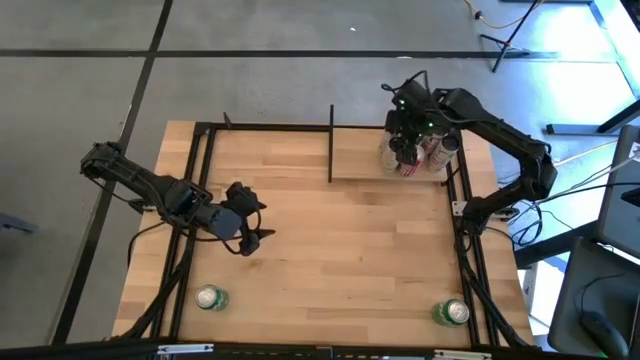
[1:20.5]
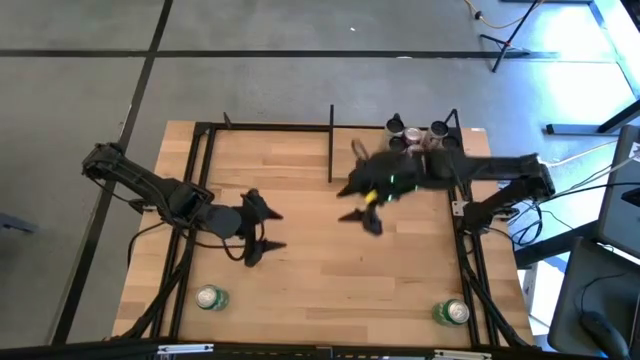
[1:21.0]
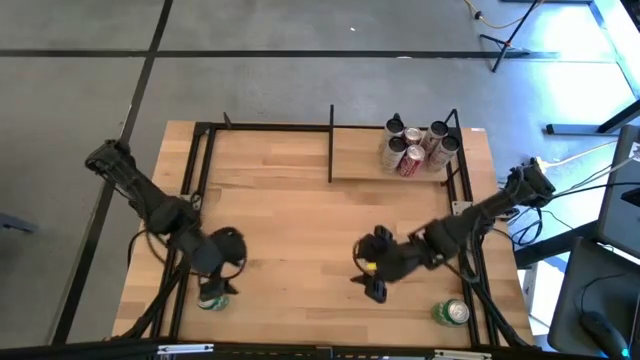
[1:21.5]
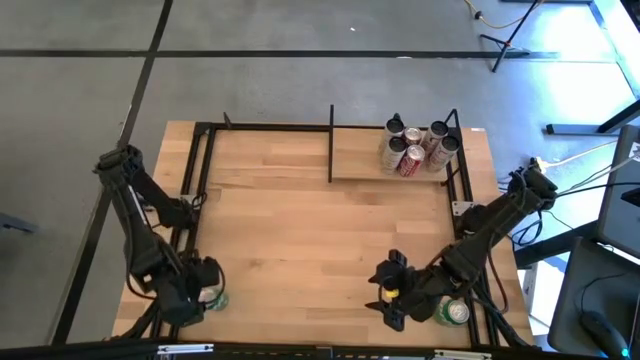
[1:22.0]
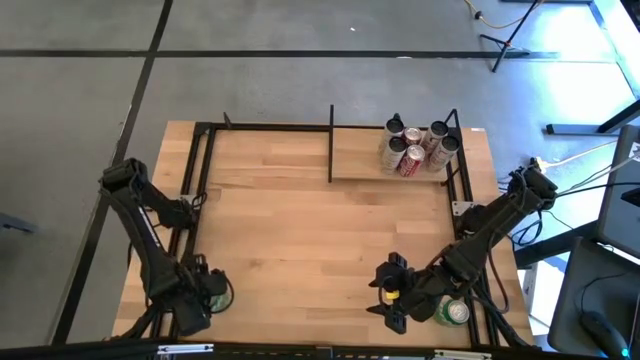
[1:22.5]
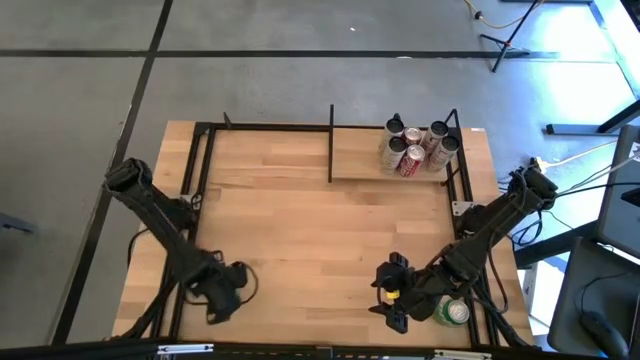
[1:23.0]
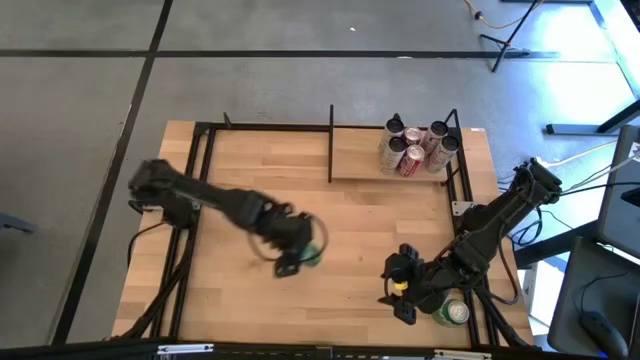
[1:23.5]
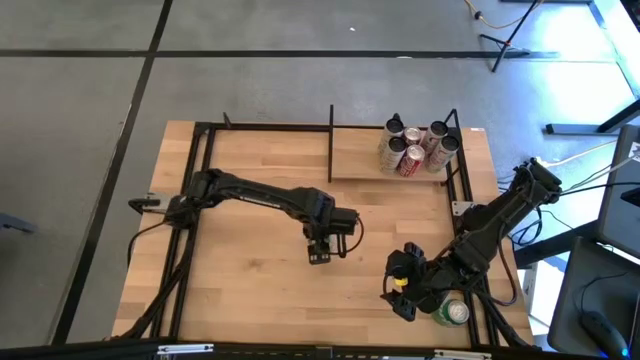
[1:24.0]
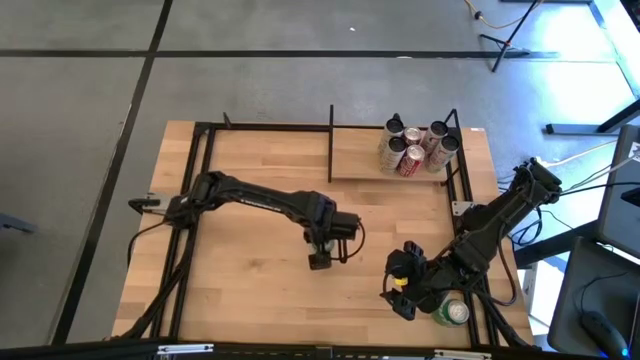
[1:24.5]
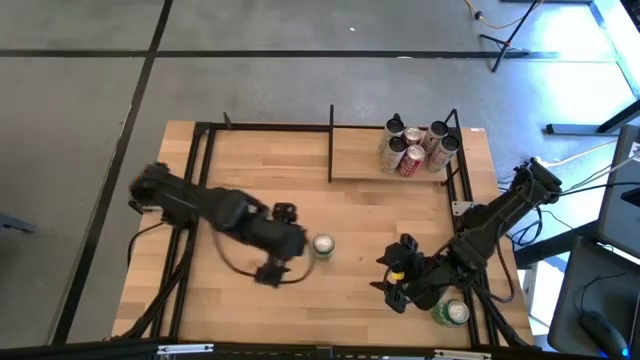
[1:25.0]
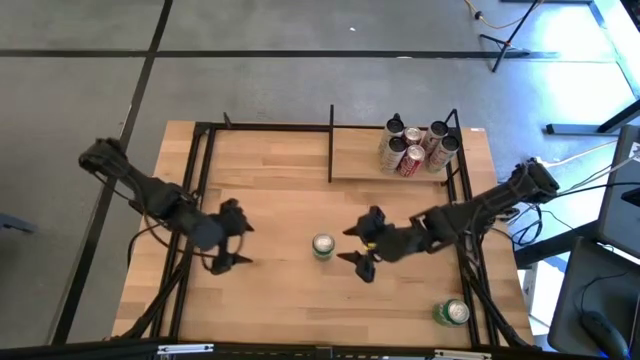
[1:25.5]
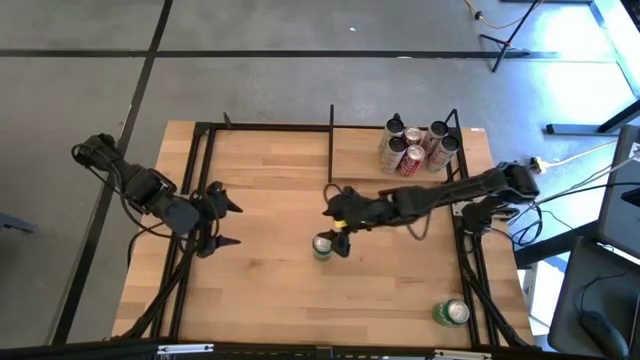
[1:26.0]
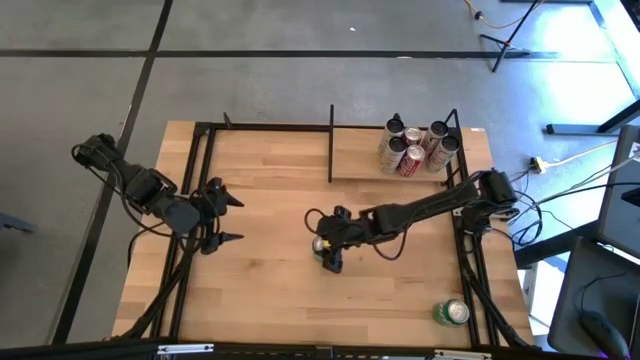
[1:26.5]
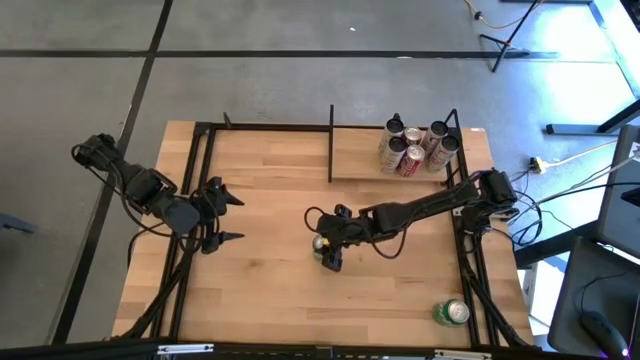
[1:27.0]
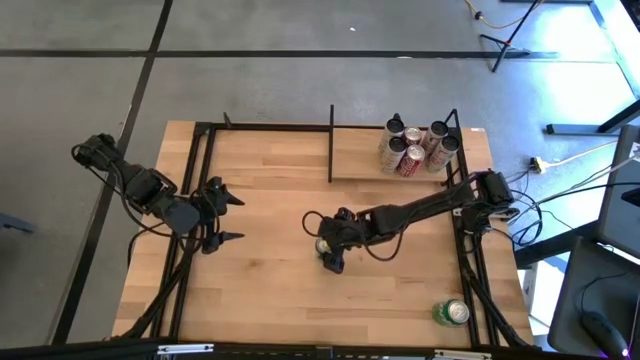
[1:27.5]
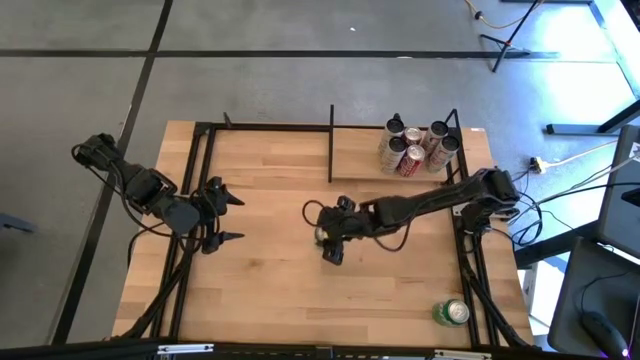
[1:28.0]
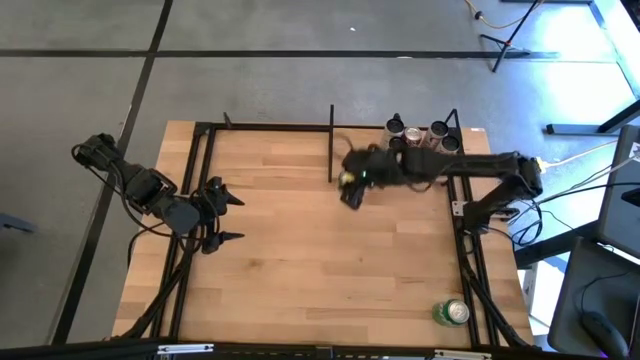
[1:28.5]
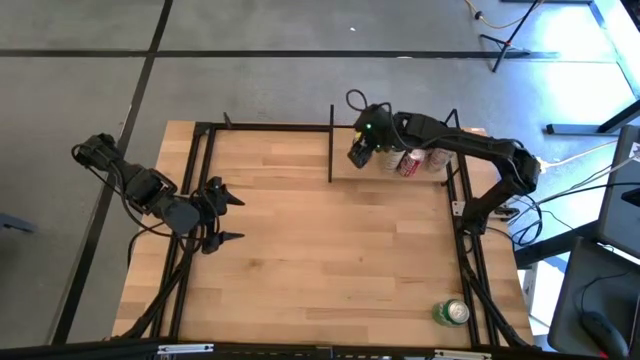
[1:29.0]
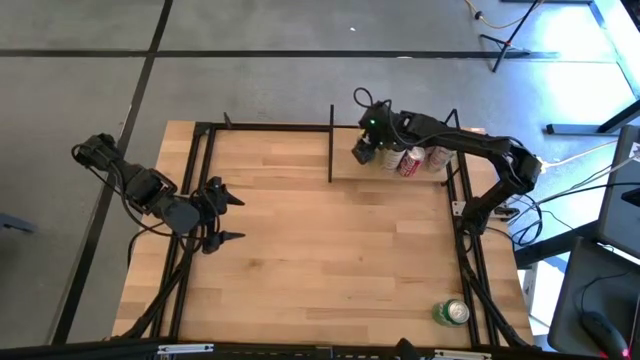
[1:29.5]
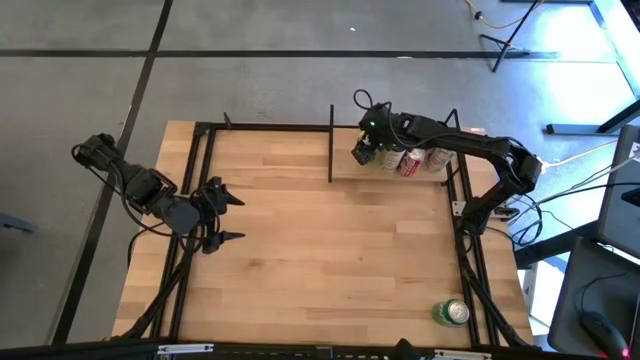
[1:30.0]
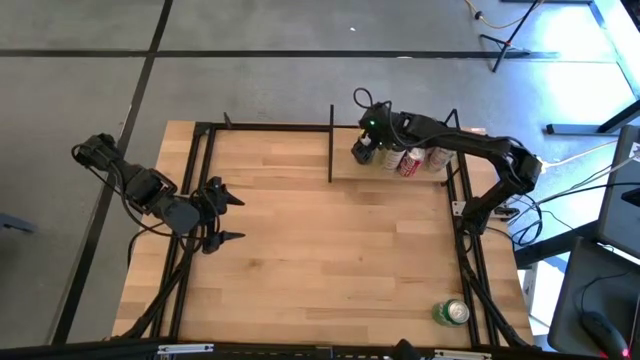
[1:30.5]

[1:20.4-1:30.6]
Task: Place canned beverage on shelf
Put the left green soda can on the shelf

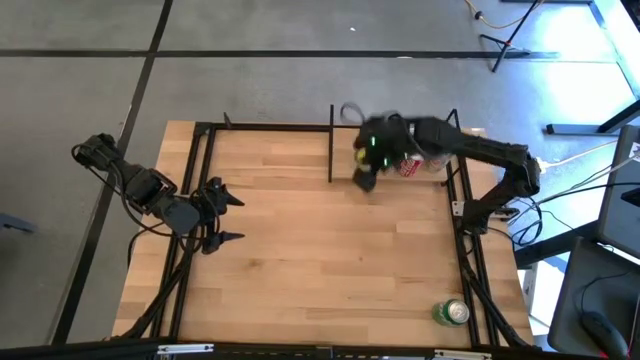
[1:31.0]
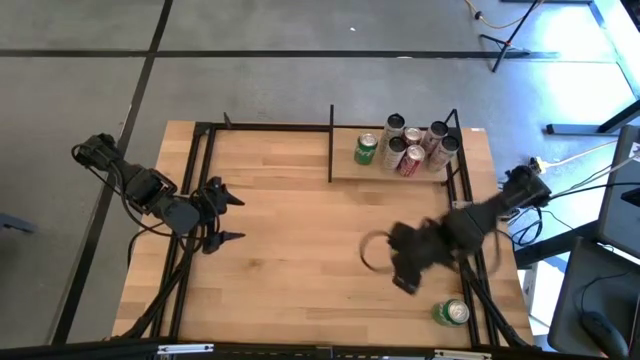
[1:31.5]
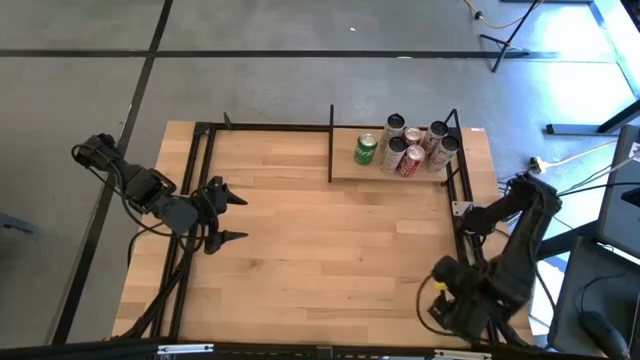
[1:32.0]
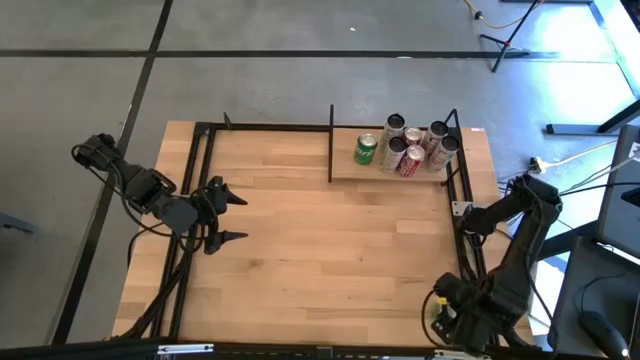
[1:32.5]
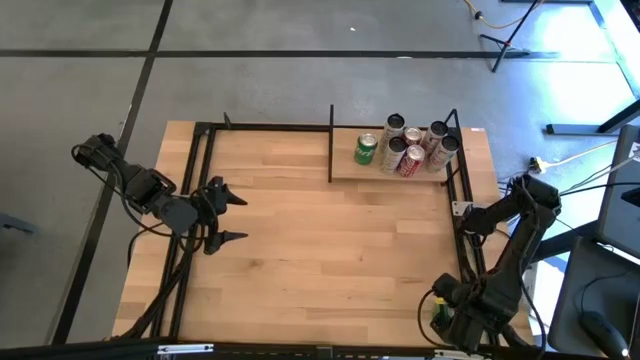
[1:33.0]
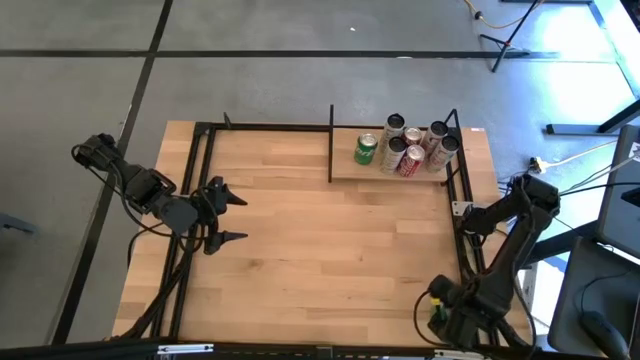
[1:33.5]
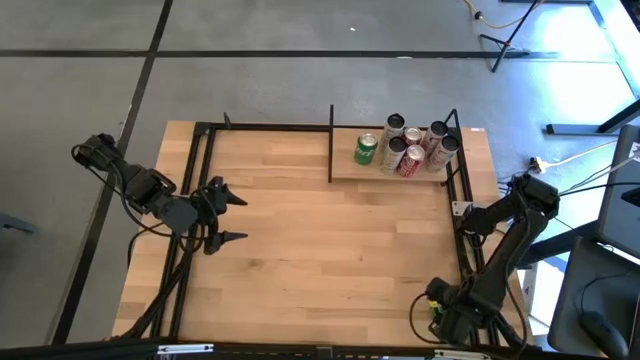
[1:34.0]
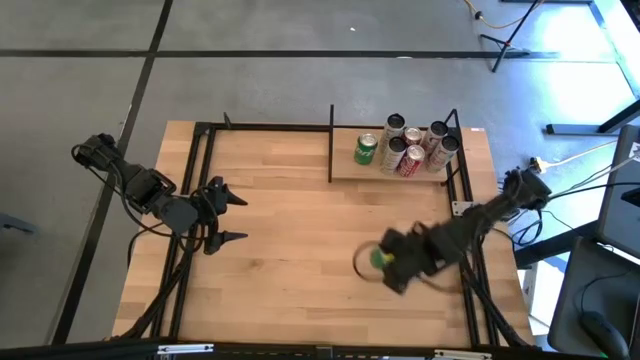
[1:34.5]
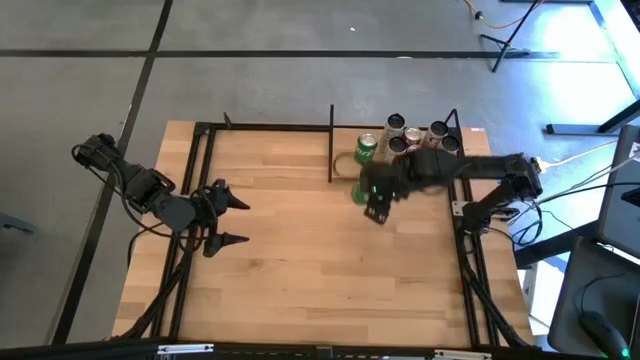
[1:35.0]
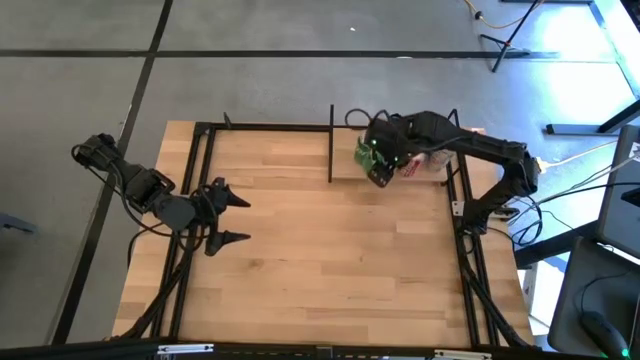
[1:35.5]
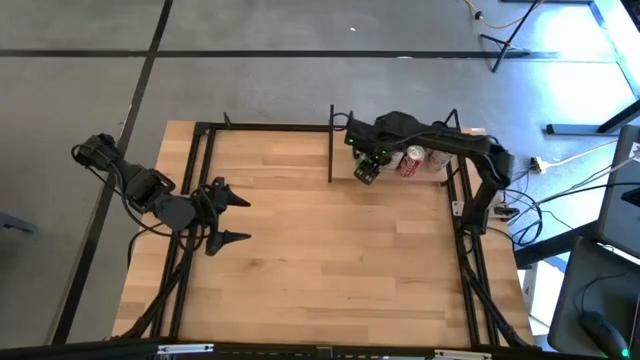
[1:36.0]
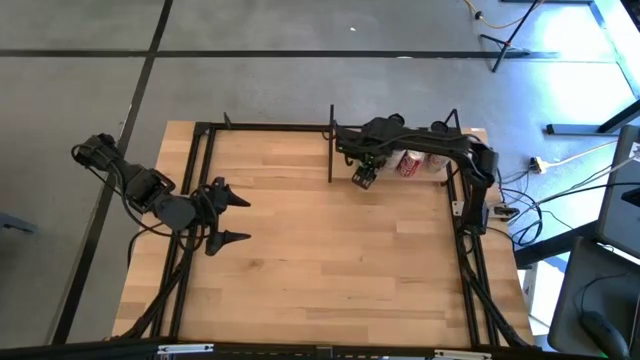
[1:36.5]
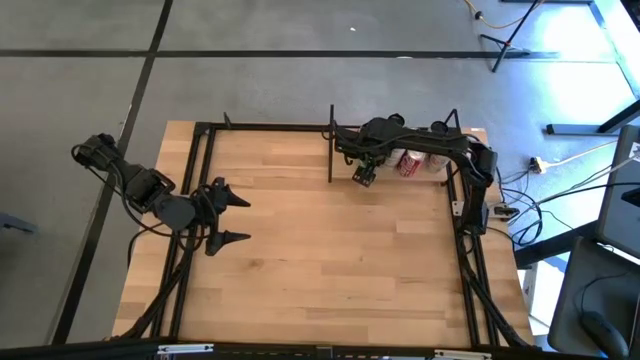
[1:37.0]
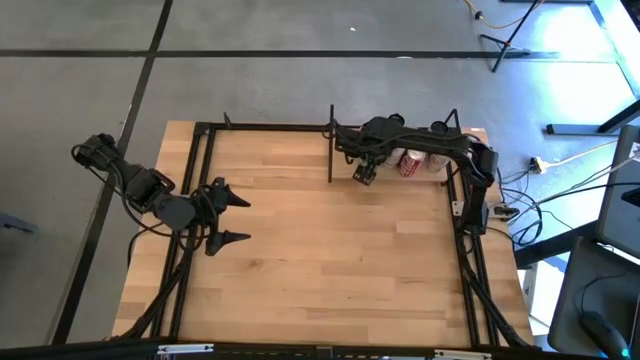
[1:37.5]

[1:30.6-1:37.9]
Put the green soda can on the shelf aligned with the other green soda can

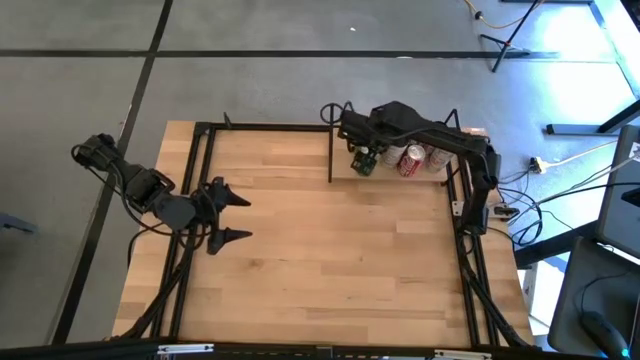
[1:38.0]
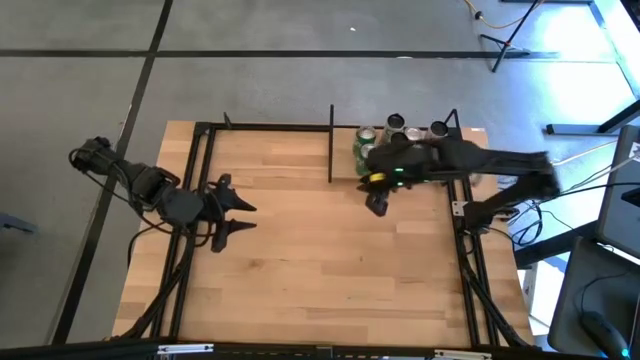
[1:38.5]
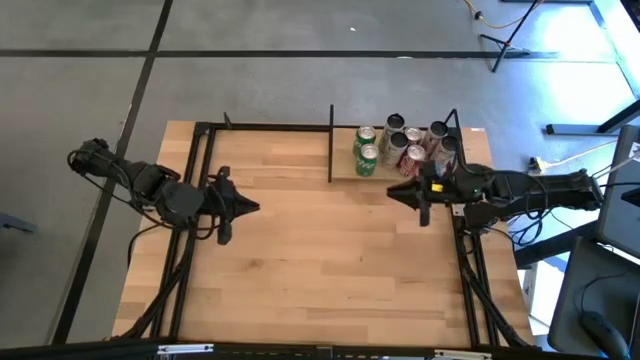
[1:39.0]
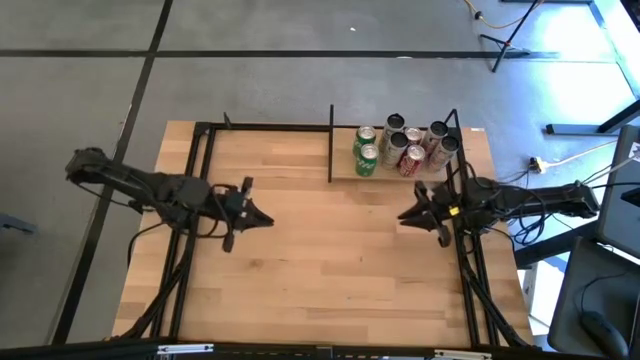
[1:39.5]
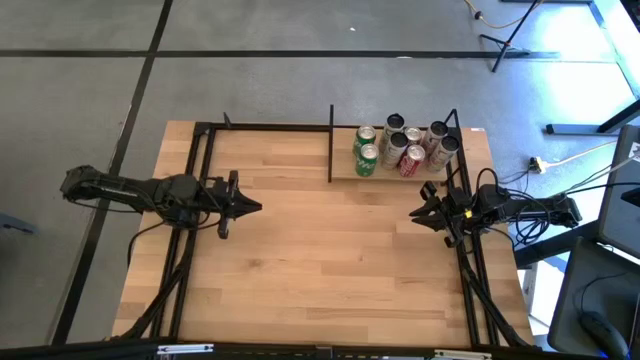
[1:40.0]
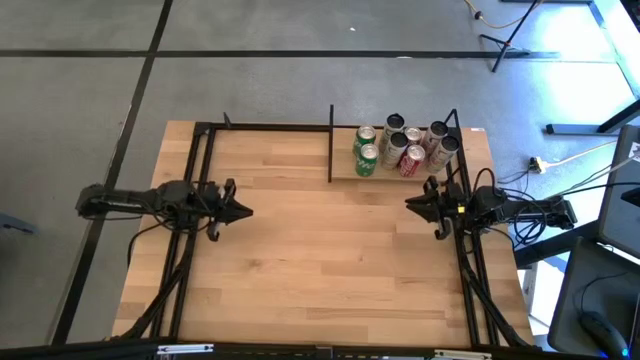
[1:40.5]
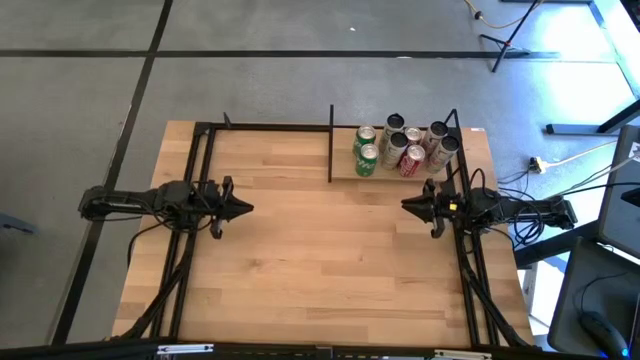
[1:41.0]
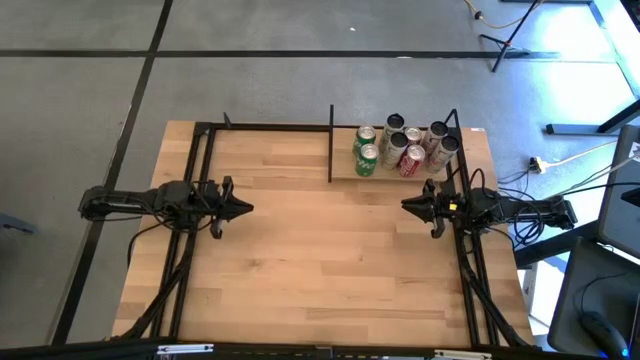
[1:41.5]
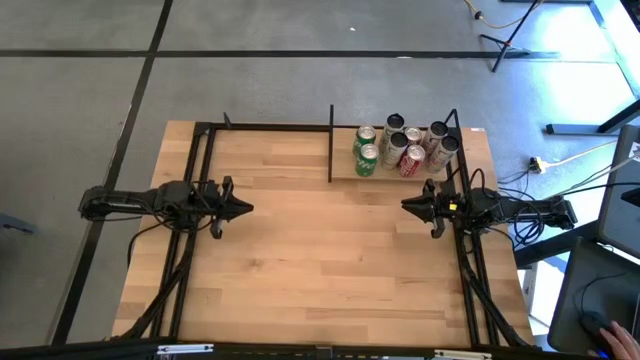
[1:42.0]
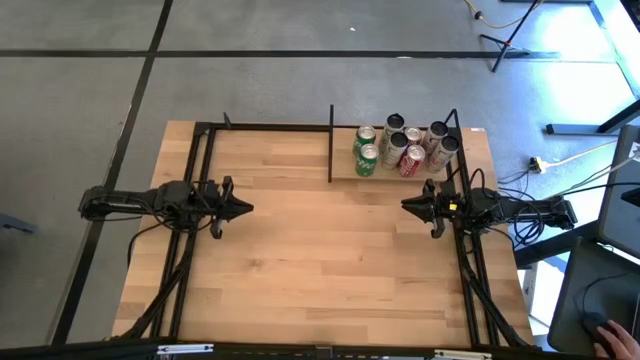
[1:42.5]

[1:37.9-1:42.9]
Return to Home Position
